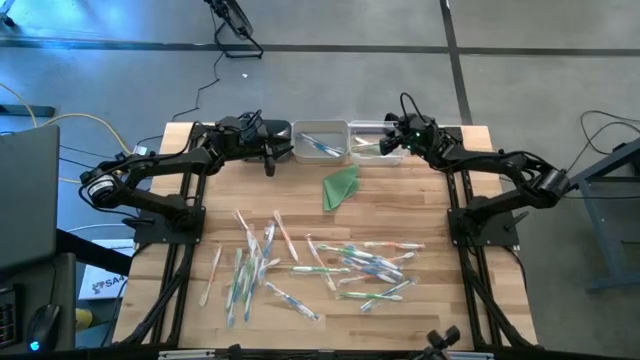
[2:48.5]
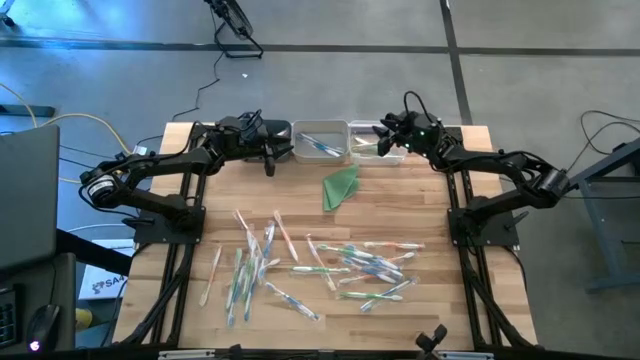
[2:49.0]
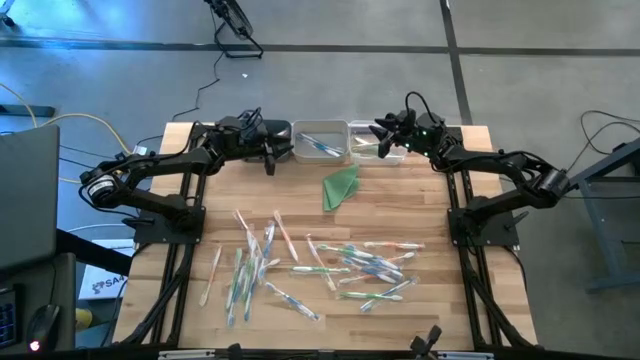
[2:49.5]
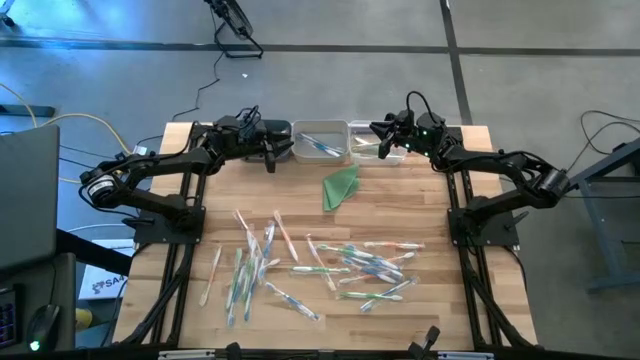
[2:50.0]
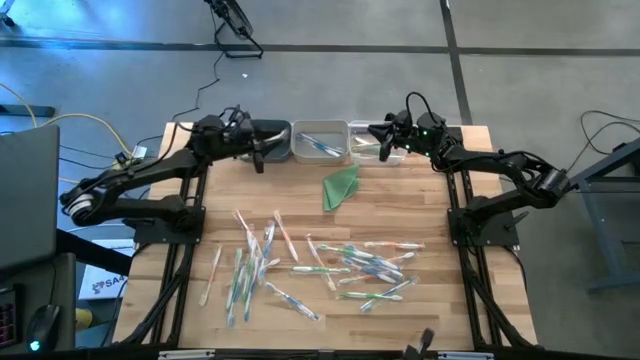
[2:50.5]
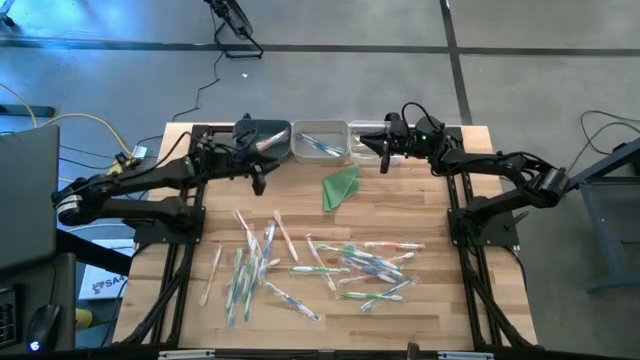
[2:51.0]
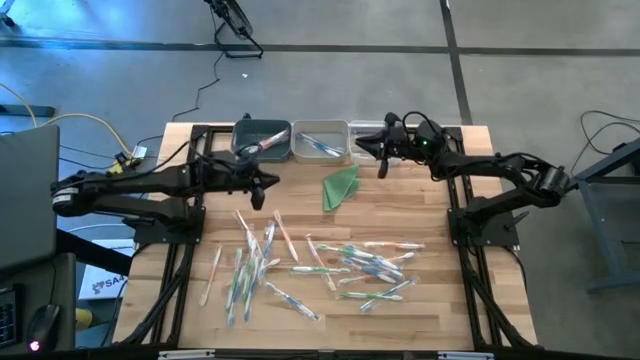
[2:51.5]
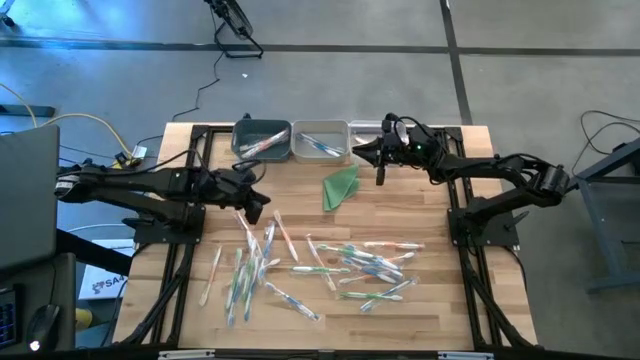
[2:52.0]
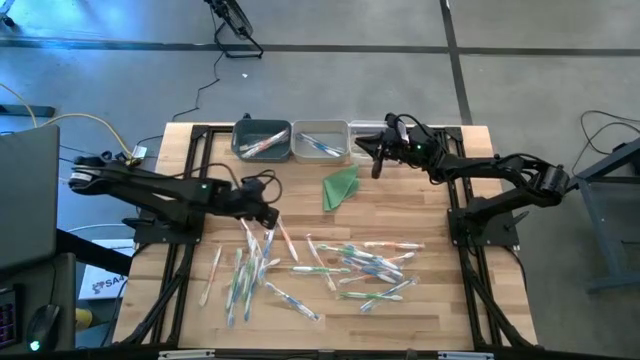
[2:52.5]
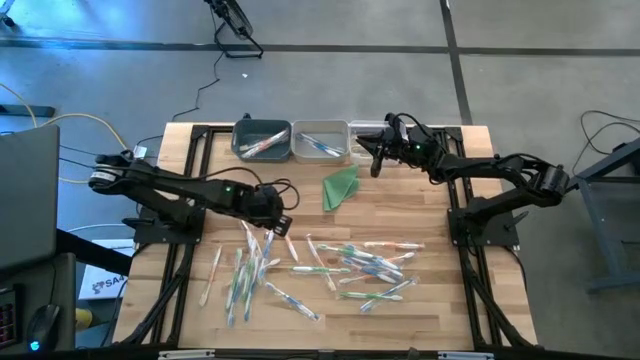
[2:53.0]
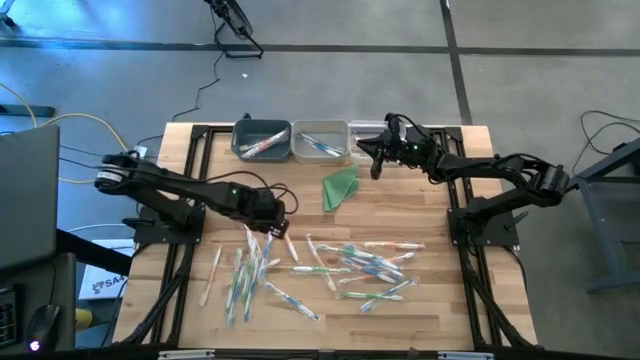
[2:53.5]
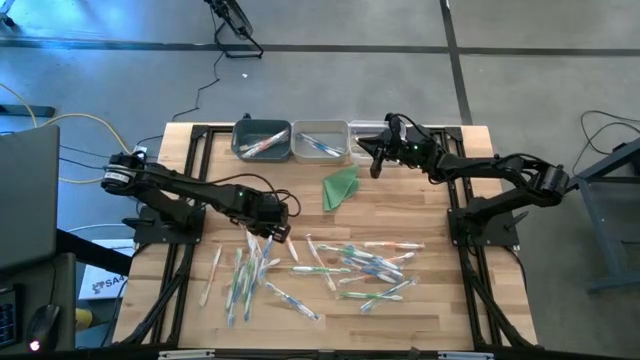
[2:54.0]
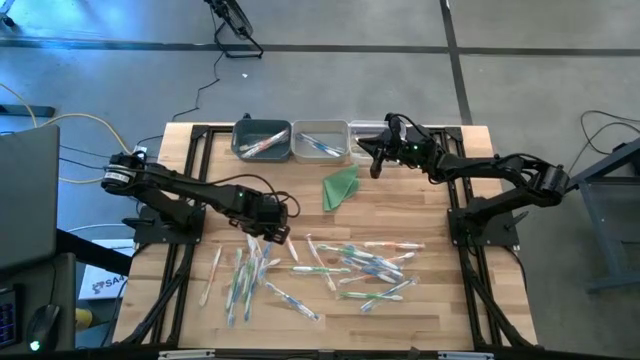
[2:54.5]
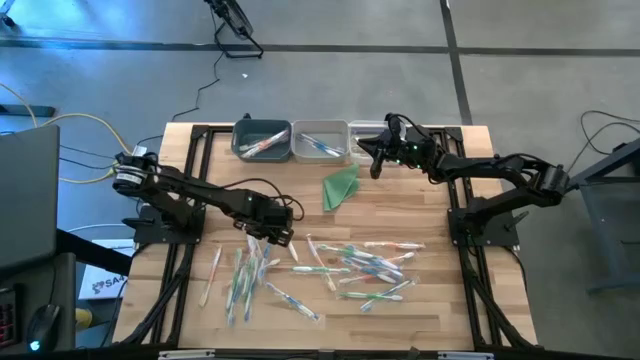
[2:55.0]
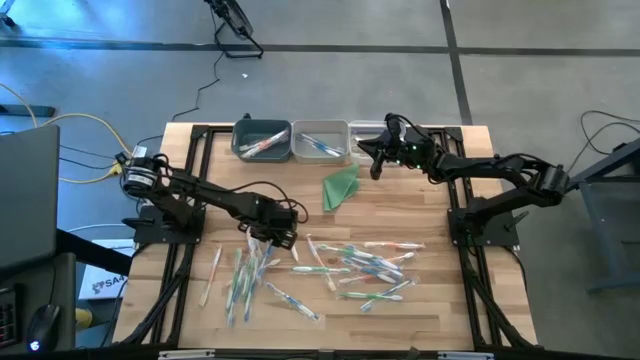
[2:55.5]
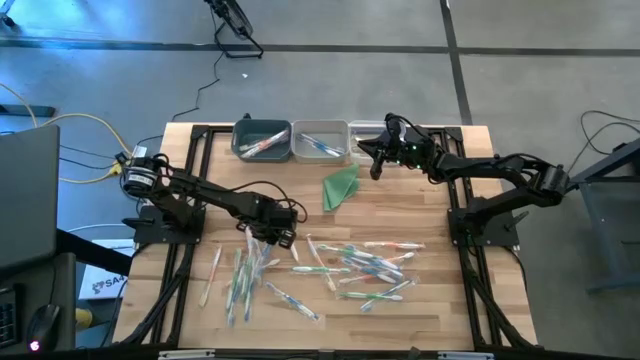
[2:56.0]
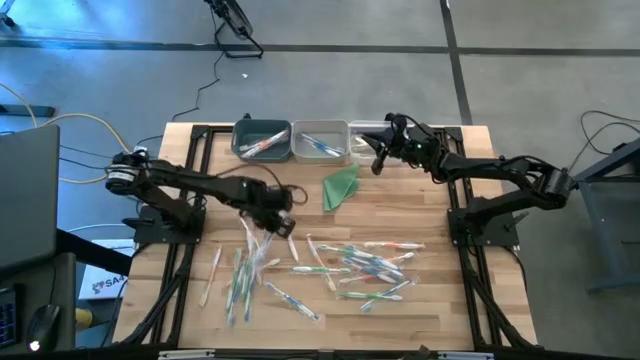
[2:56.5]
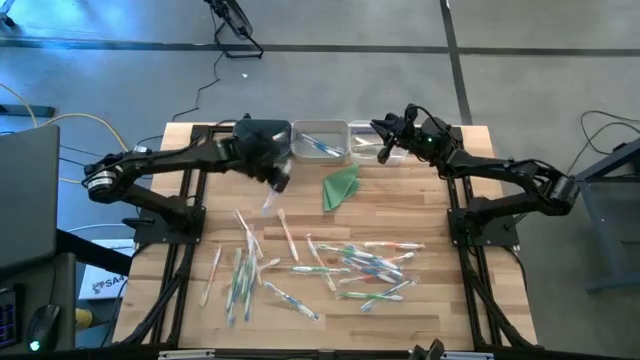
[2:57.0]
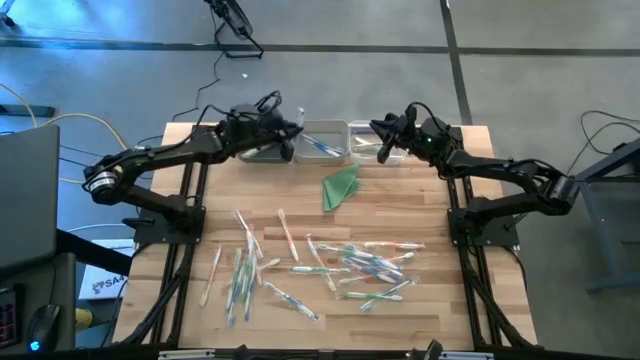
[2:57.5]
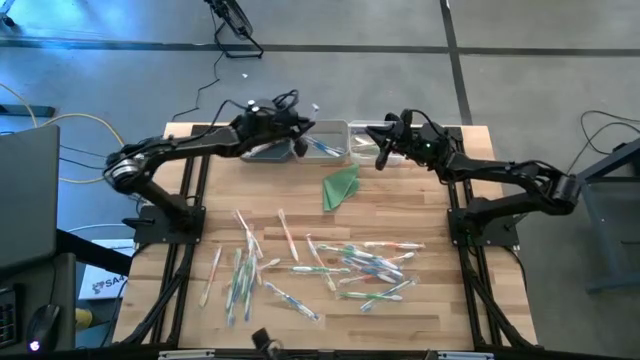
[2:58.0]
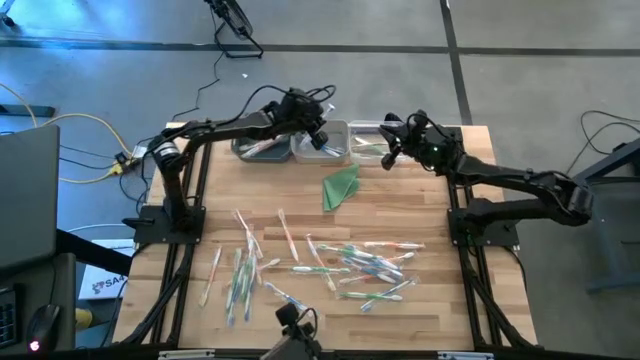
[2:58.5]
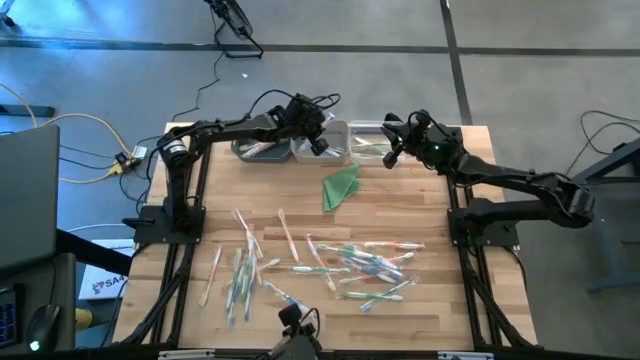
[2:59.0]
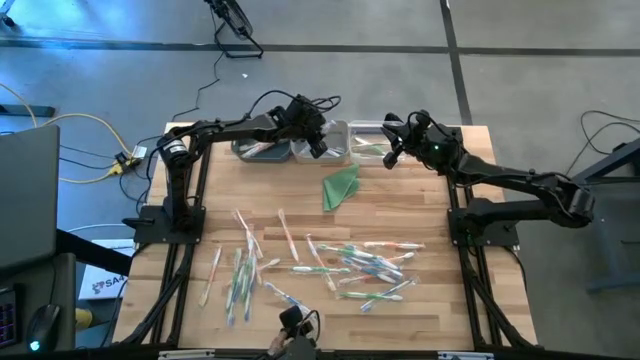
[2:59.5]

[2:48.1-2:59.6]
Task: Pick & Place Toothbrushes
Put the blue toothbrush into the gray bin

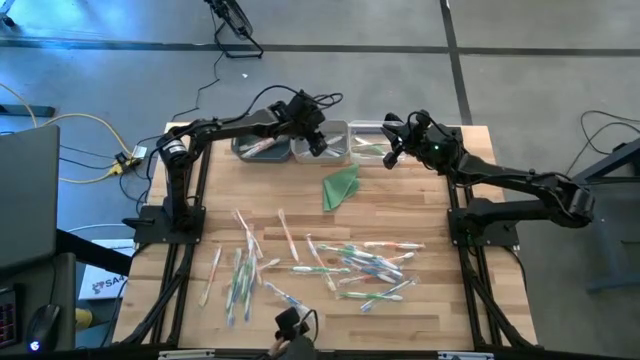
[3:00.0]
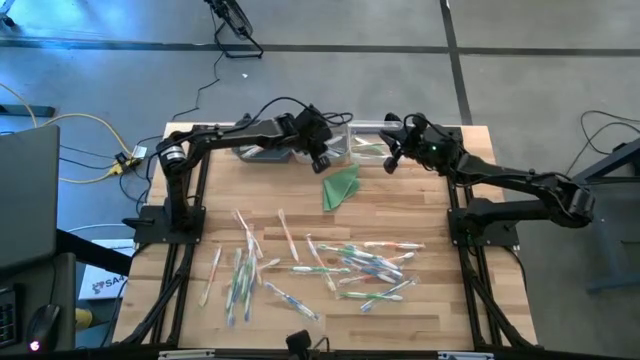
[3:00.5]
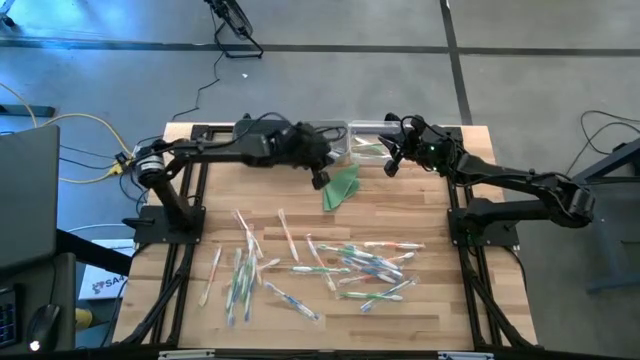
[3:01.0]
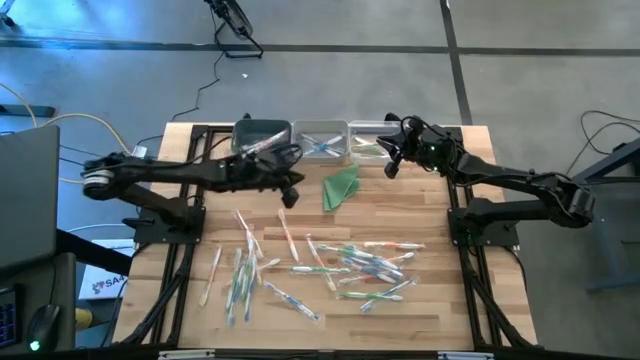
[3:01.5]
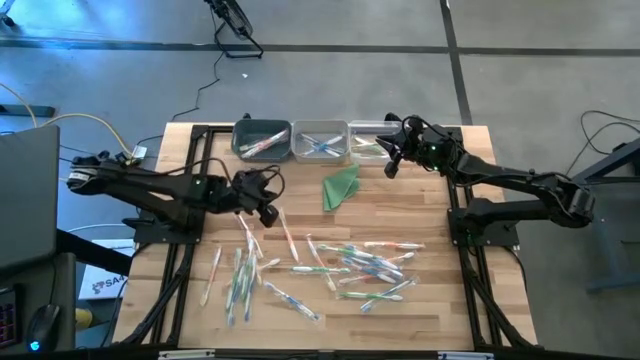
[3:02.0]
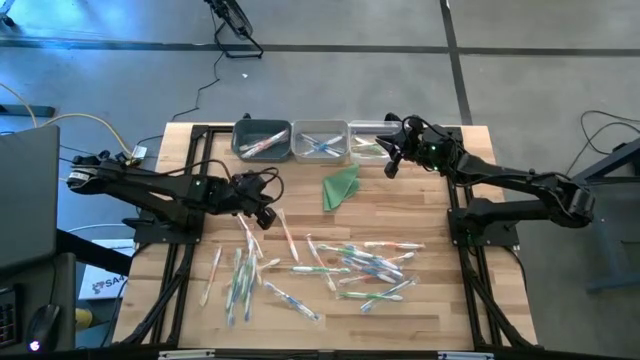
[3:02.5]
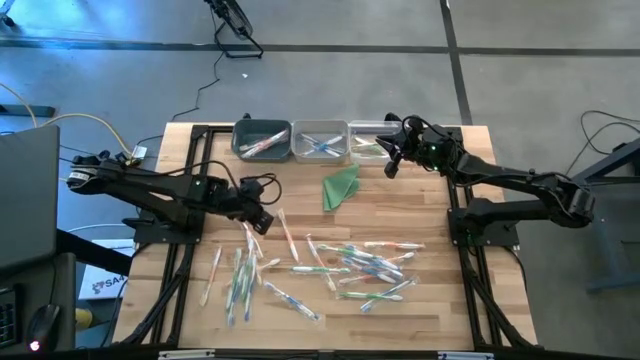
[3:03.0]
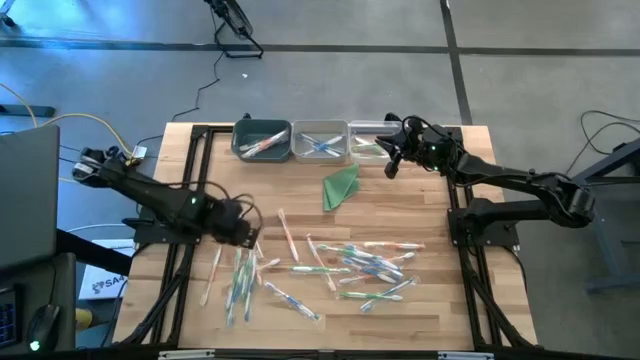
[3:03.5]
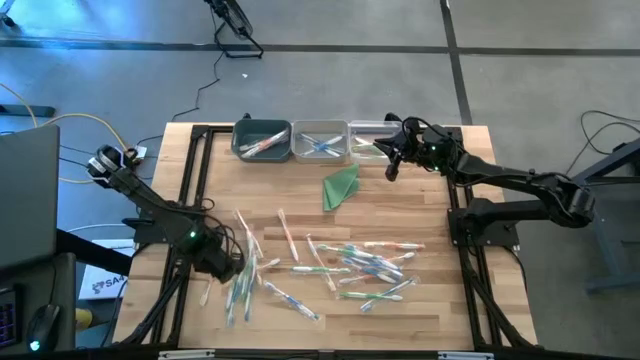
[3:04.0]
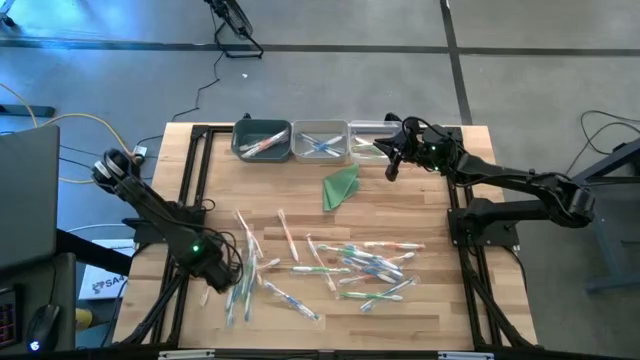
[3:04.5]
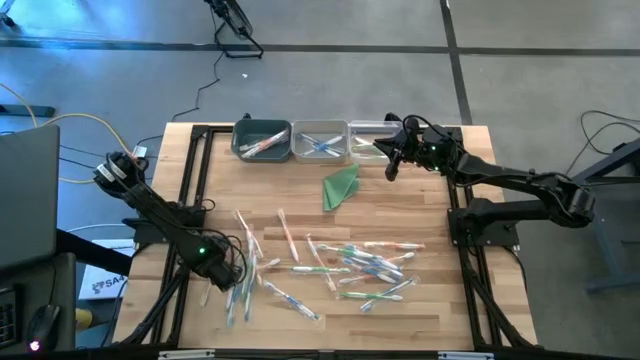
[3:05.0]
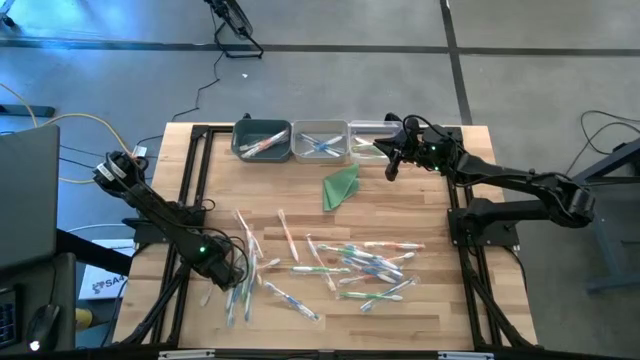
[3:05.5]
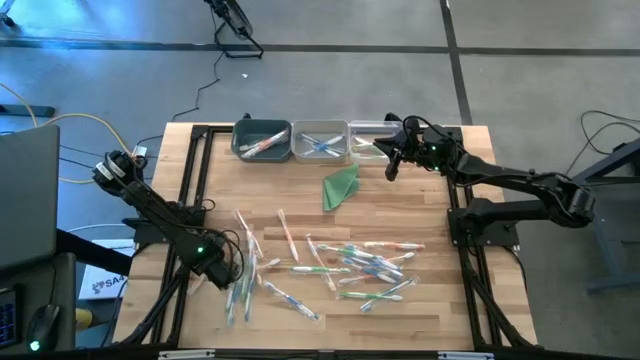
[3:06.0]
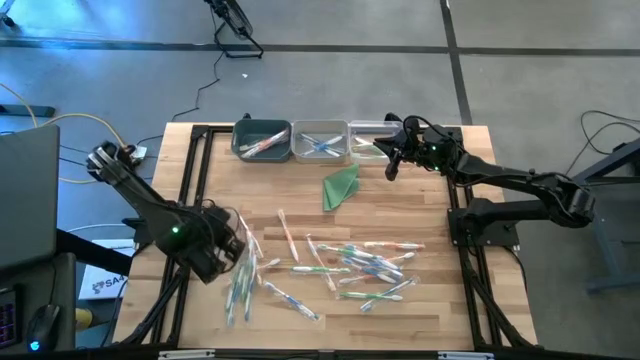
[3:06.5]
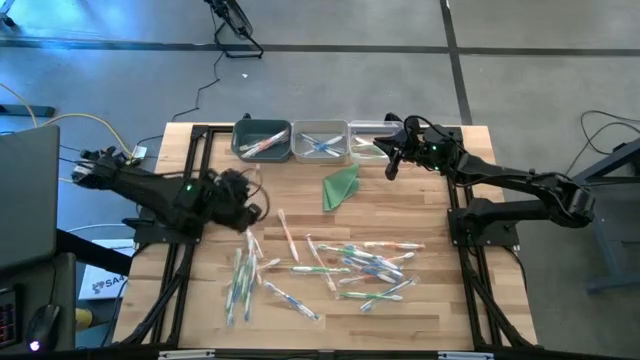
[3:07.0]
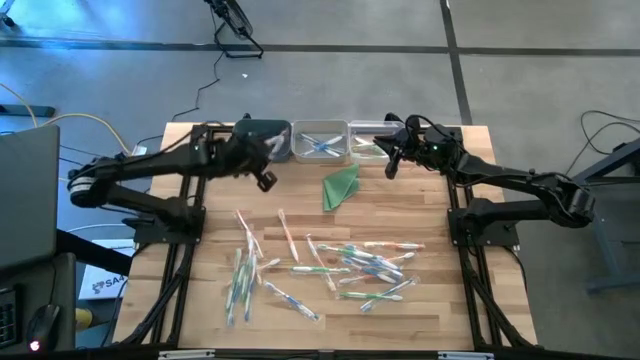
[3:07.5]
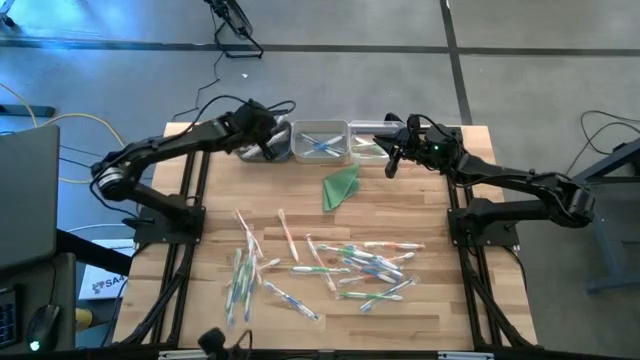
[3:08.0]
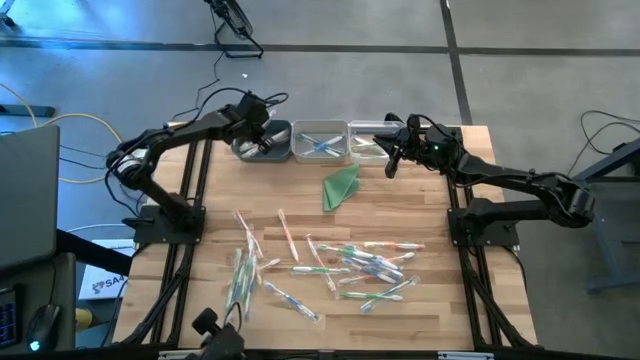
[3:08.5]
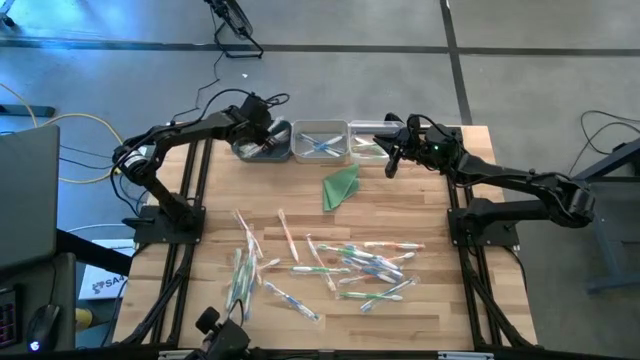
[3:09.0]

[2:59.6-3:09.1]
Put the orange toothbrush into the dark blue bin
